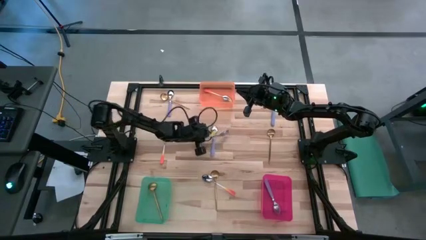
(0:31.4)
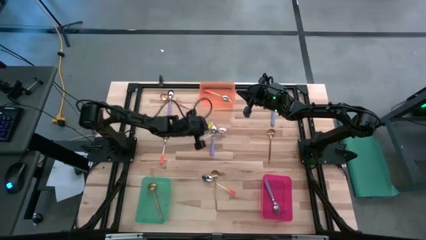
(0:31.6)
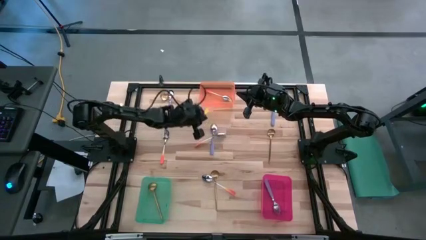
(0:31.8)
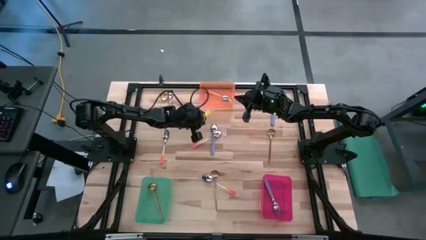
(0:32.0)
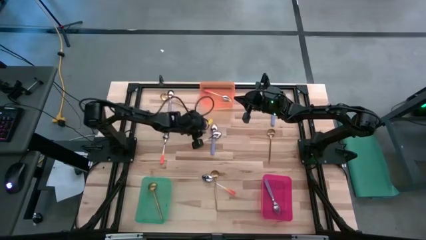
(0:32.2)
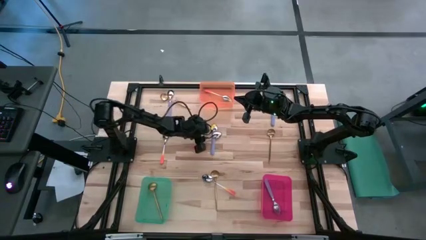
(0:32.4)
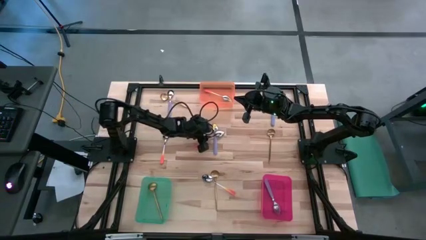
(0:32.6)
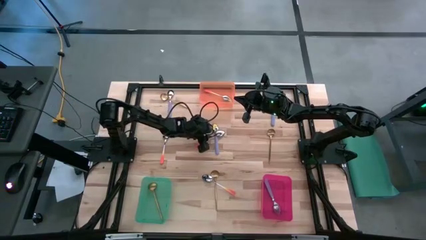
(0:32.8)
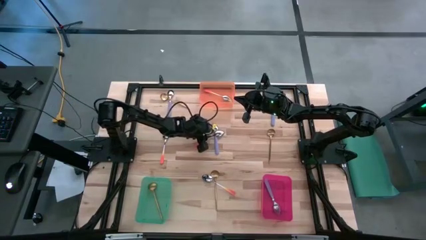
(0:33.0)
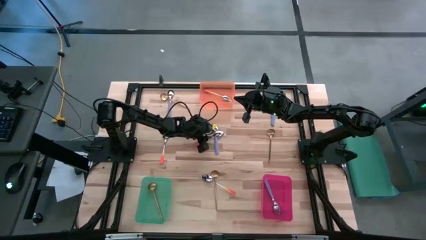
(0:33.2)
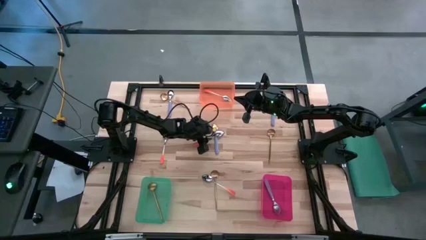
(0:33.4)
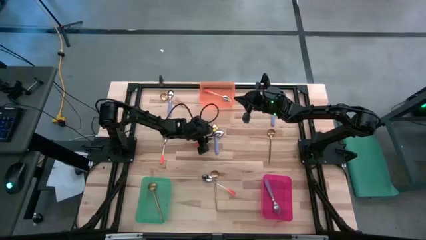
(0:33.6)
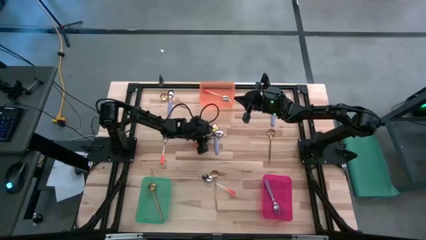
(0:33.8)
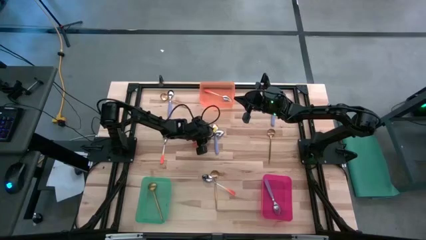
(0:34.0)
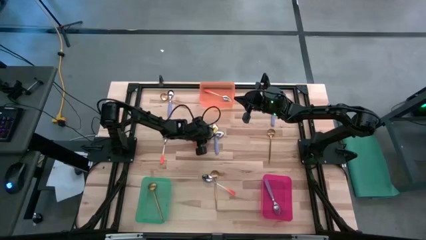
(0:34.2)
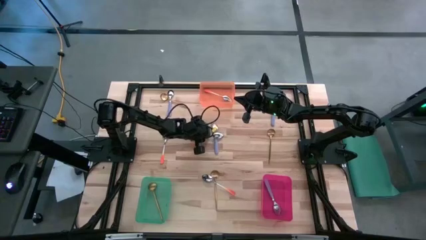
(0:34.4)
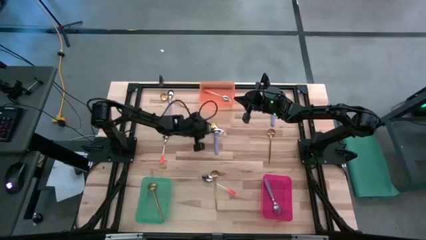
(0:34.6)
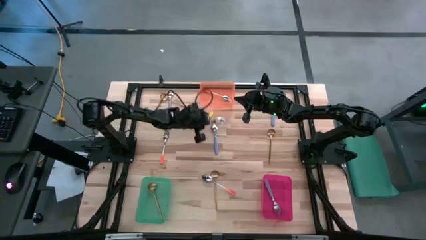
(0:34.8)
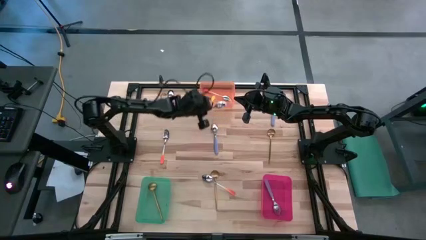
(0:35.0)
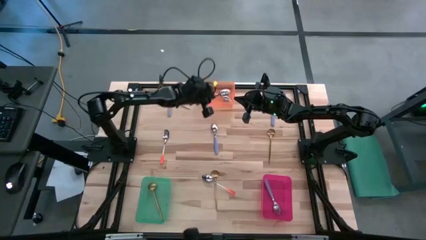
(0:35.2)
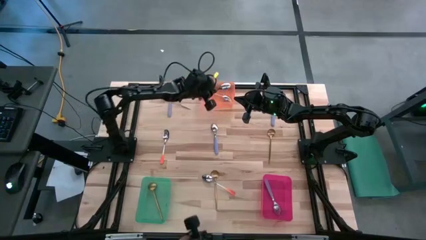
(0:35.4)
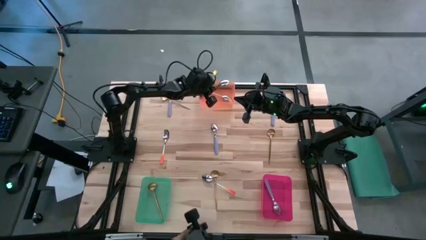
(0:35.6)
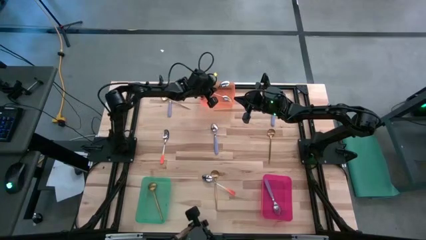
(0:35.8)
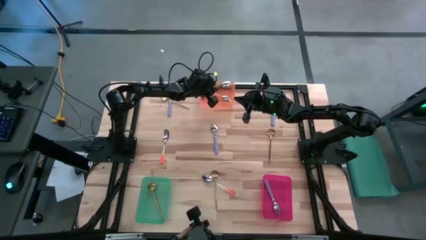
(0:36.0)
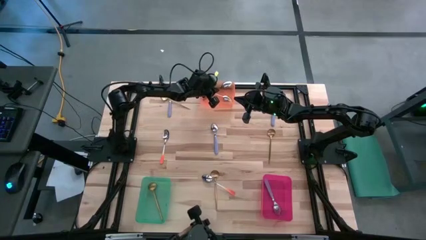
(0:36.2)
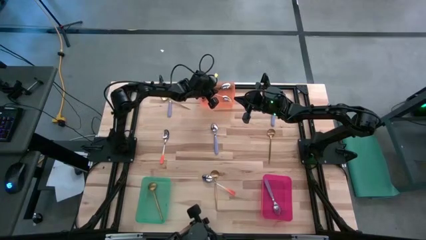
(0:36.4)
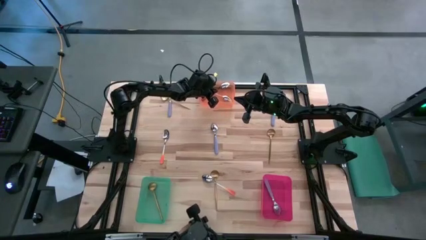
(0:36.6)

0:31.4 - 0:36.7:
Task: Sort silverware by color (type)
Put the orange spoon into the orange bin

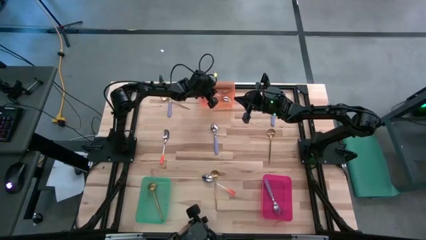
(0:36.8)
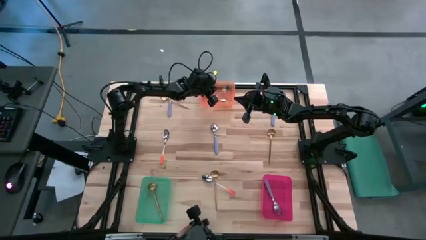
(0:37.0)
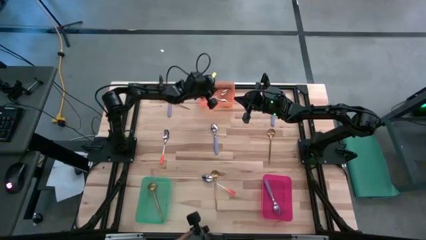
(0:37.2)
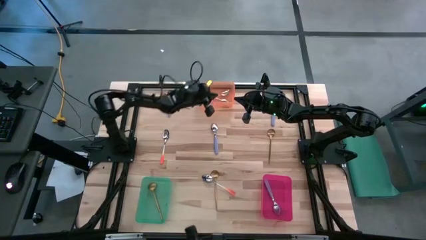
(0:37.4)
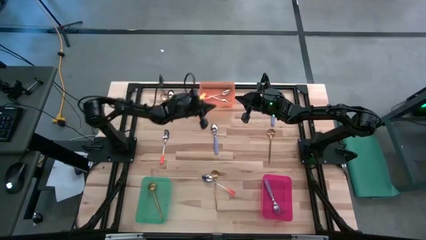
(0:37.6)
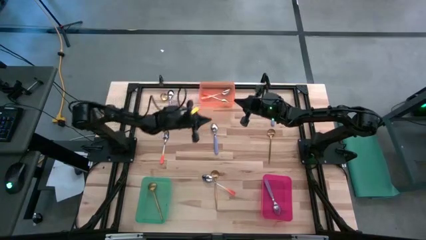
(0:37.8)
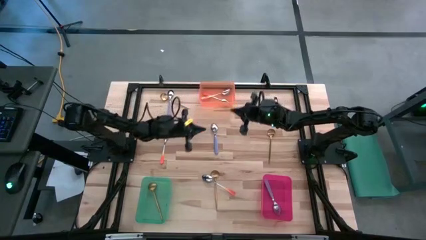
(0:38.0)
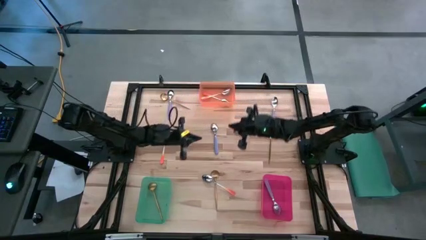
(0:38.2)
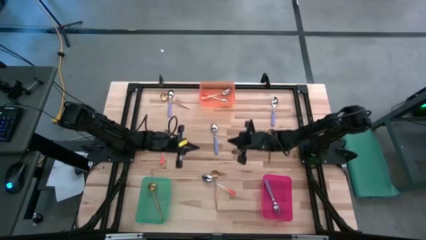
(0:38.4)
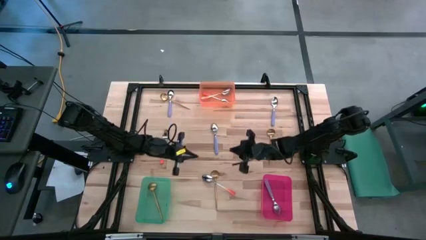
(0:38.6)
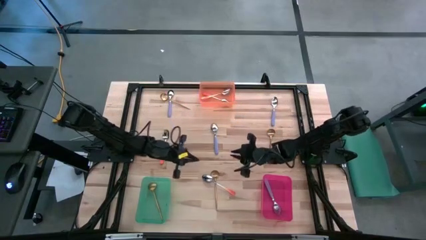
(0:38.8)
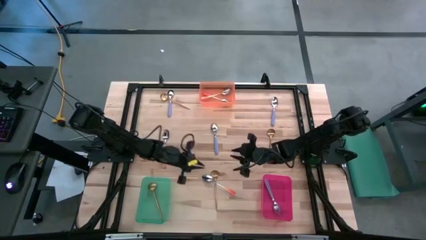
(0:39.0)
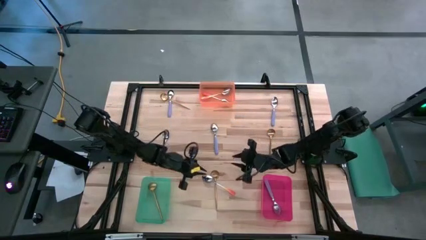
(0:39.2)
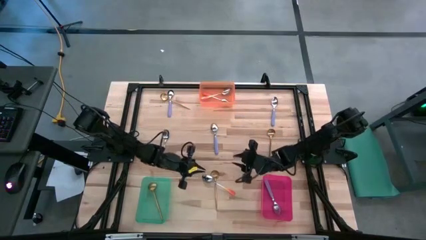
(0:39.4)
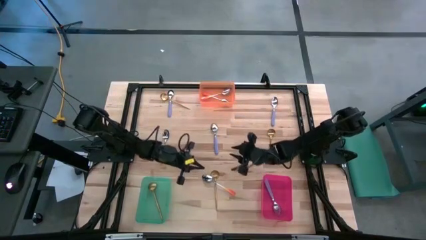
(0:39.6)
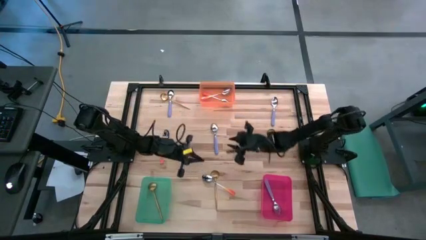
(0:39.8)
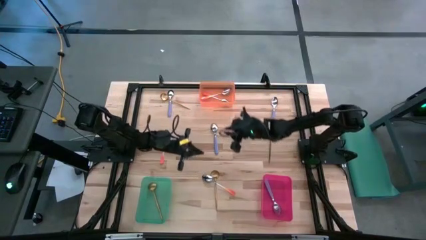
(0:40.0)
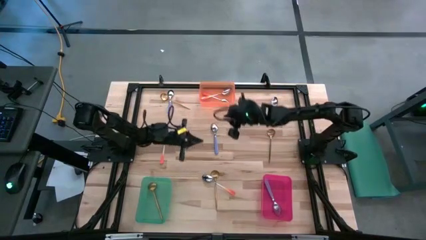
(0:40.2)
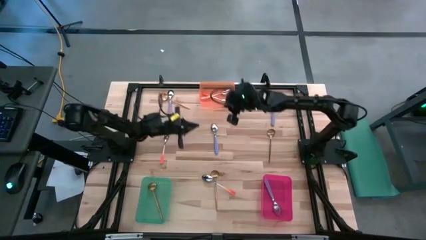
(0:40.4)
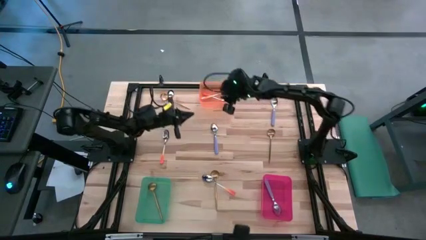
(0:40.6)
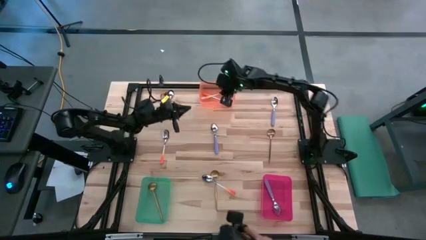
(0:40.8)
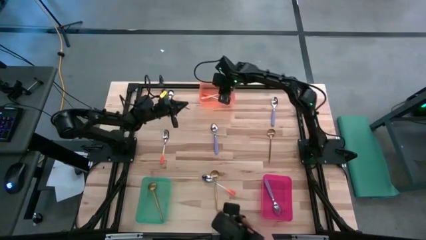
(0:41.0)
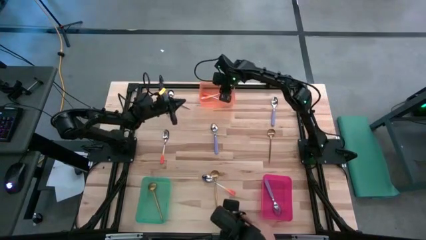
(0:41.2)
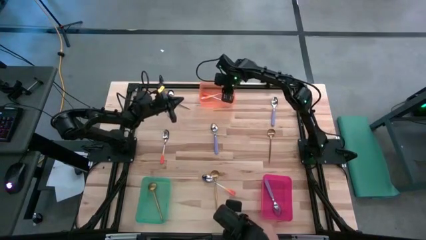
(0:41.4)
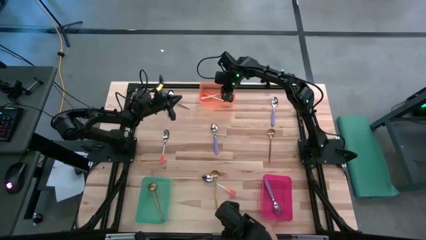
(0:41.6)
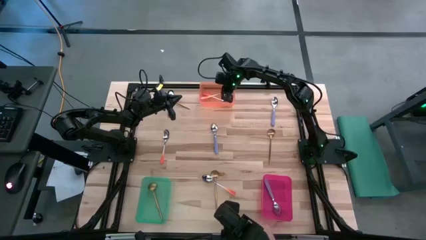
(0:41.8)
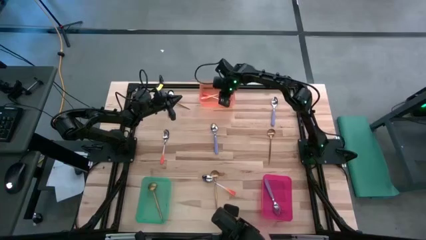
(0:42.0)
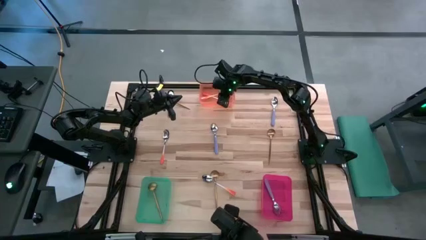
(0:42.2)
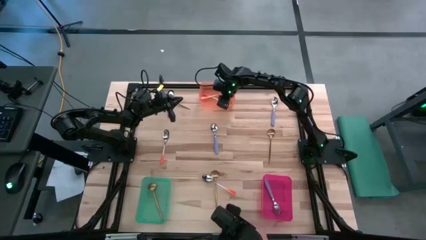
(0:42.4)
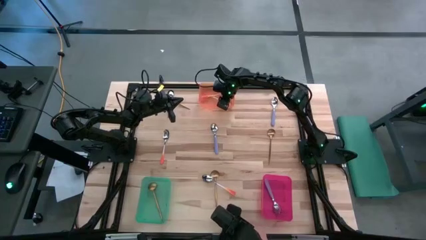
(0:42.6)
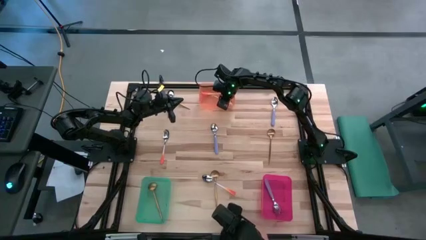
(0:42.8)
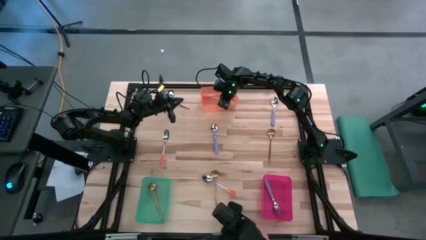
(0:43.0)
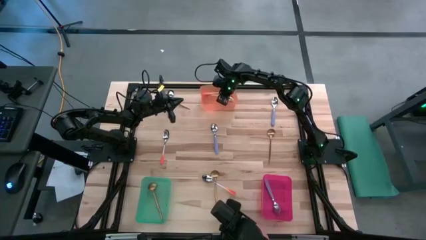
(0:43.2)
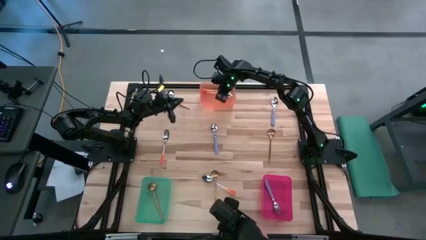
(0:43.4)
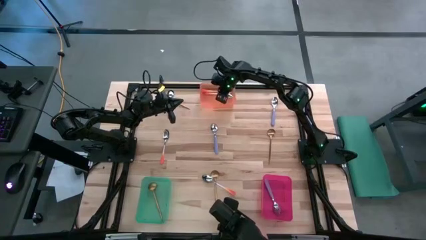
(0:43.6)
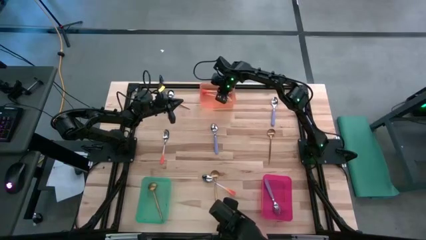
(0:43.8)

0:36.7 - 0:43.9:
Adjust the orange spoon

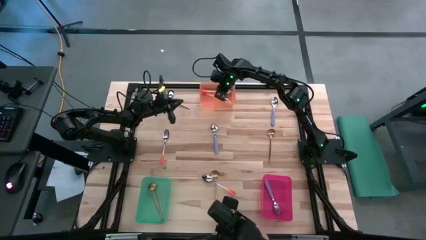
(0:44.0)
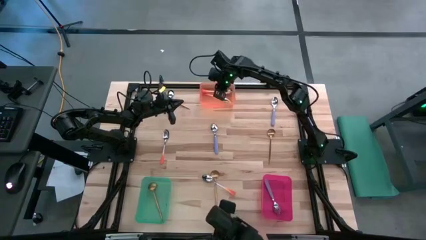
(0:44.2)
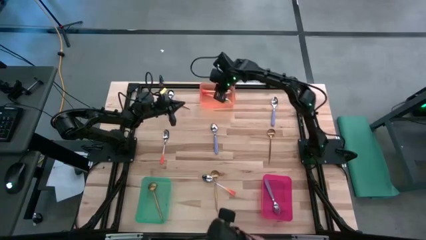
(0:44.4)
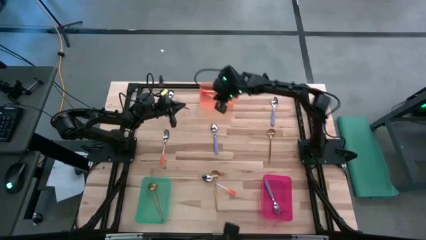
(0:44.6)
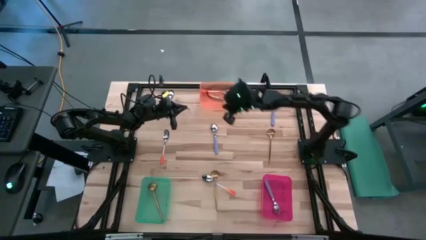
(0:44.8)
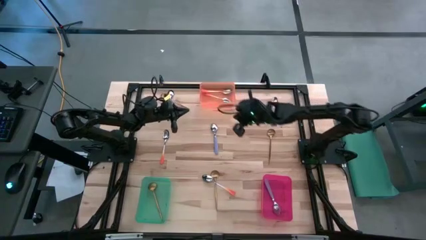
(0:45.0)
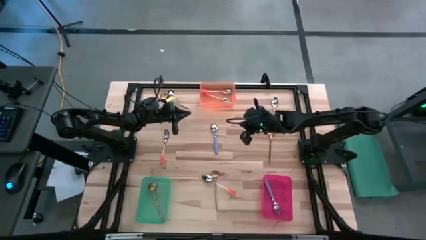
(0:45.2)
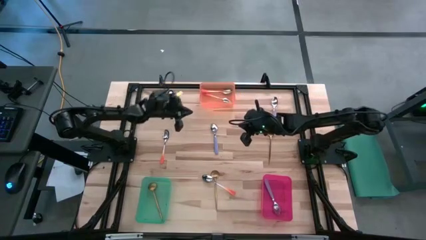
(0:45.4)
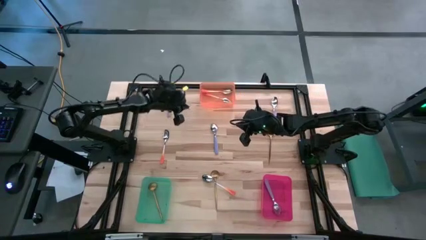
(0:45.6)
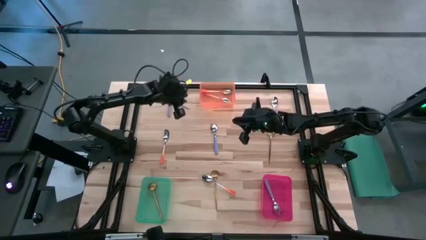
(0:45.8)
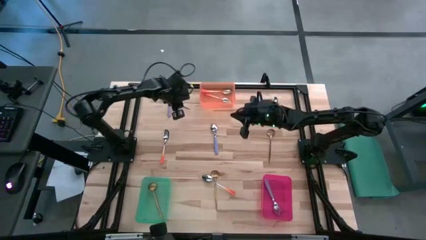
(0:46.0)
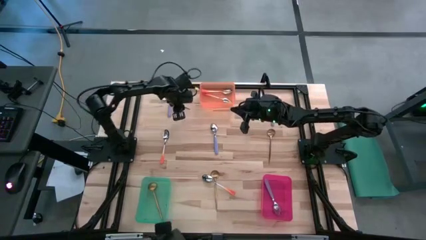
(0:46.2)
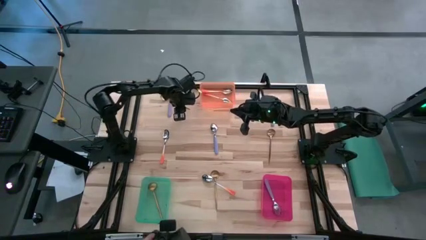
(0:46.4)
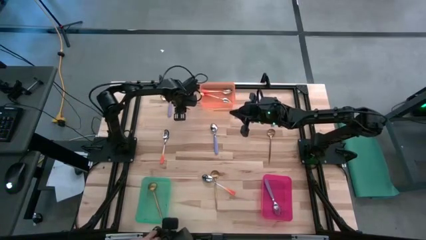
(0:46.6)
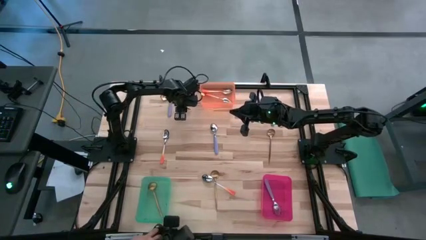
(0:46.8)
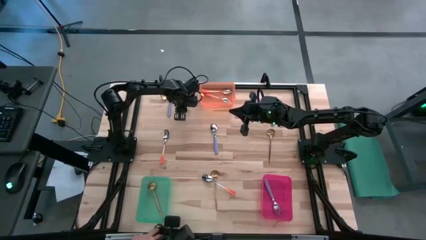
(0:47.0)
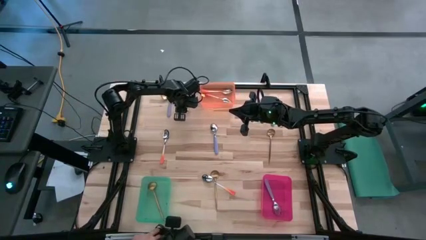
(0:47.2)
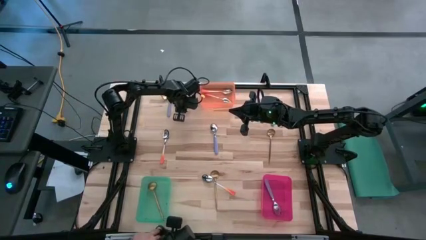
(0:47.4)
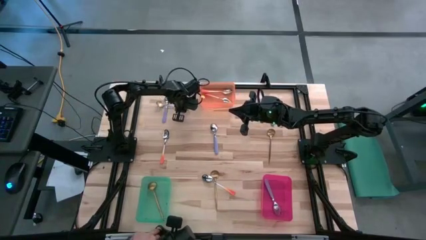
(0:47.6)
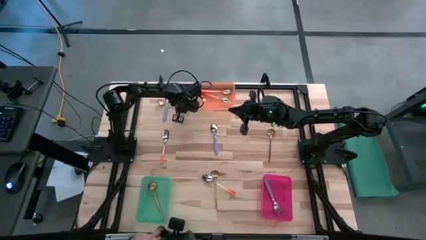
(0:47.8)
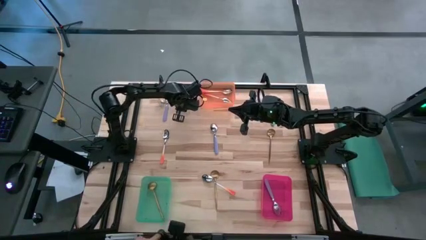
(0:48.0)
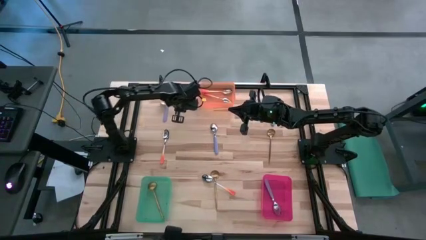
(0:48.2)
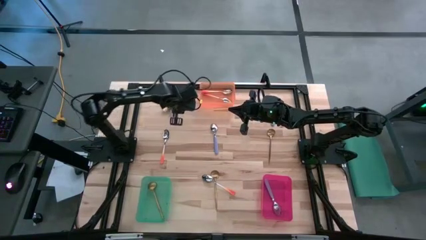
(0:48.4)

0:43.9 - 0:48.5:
Put the golden spoon into the bin
